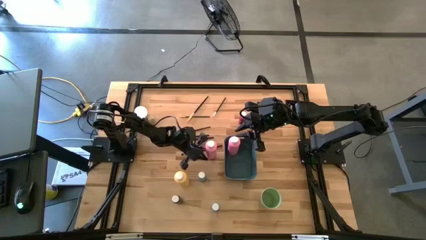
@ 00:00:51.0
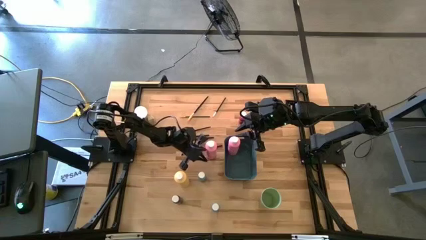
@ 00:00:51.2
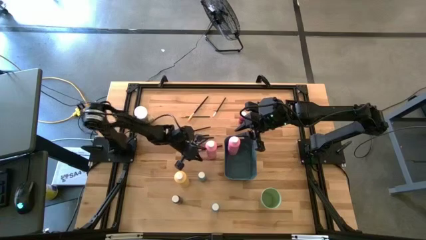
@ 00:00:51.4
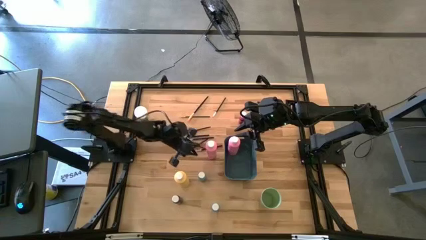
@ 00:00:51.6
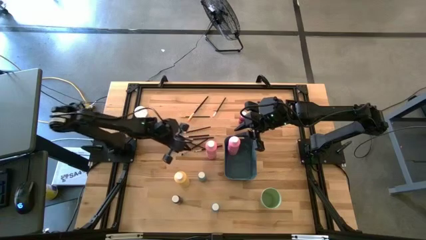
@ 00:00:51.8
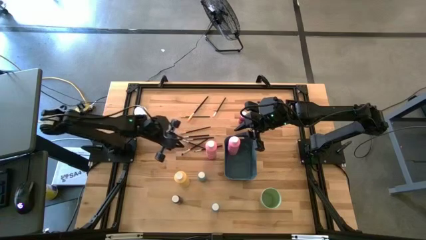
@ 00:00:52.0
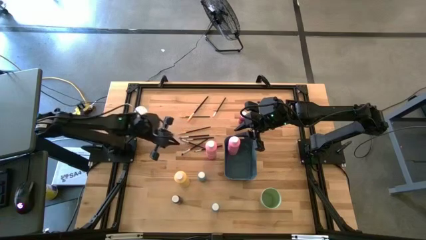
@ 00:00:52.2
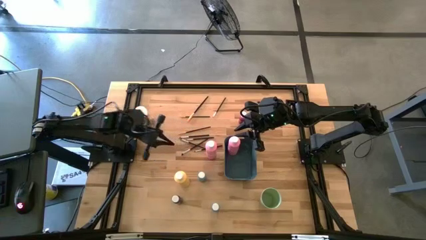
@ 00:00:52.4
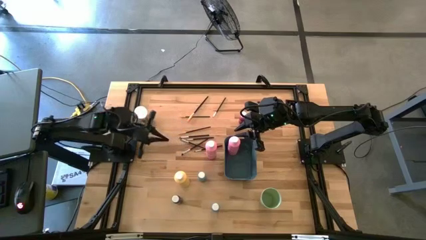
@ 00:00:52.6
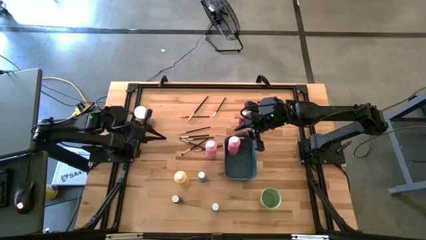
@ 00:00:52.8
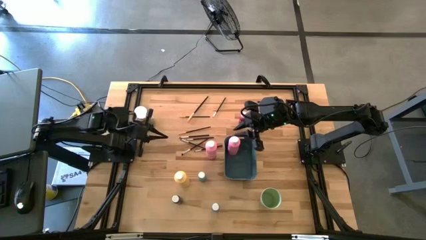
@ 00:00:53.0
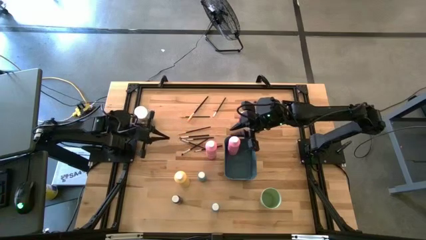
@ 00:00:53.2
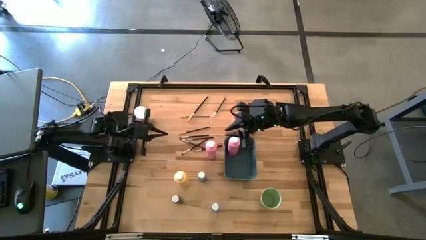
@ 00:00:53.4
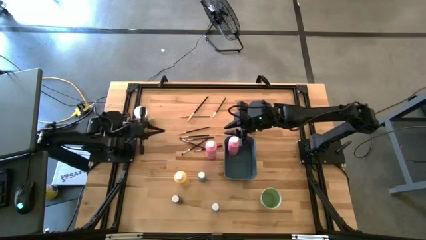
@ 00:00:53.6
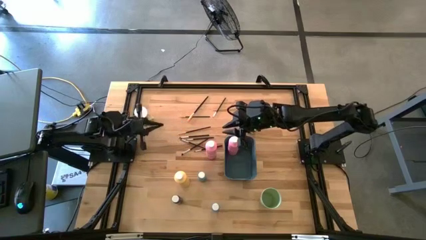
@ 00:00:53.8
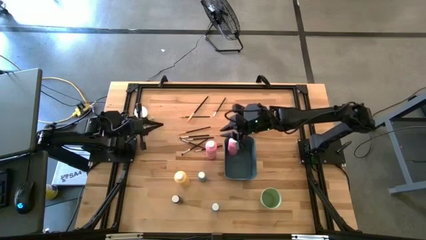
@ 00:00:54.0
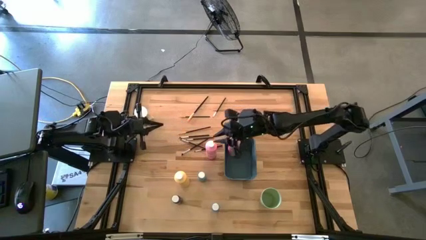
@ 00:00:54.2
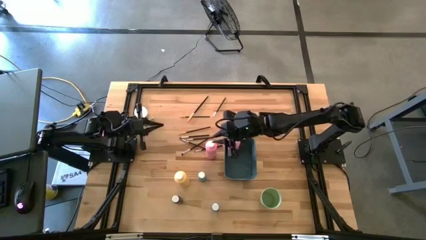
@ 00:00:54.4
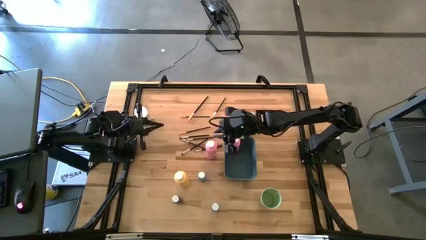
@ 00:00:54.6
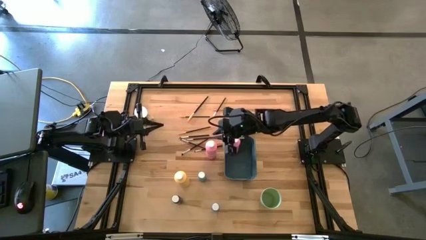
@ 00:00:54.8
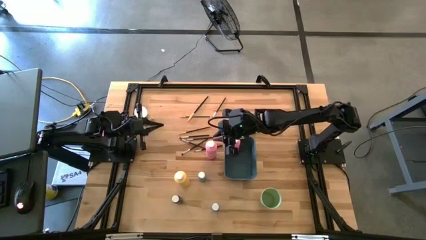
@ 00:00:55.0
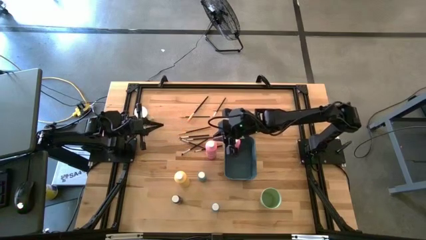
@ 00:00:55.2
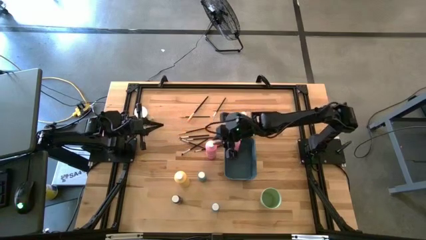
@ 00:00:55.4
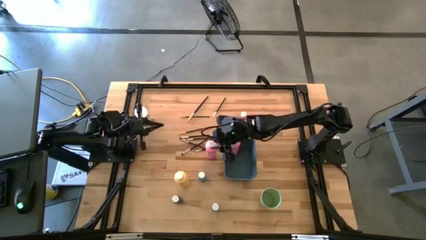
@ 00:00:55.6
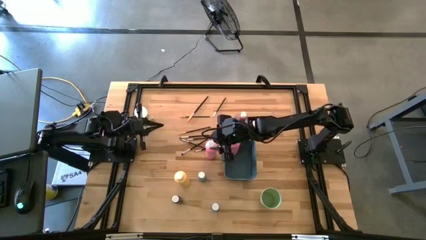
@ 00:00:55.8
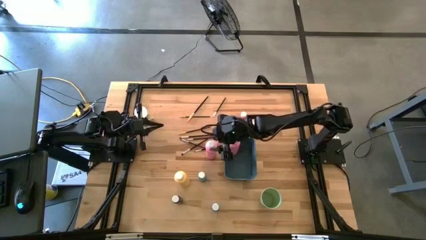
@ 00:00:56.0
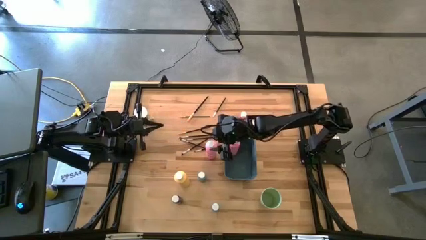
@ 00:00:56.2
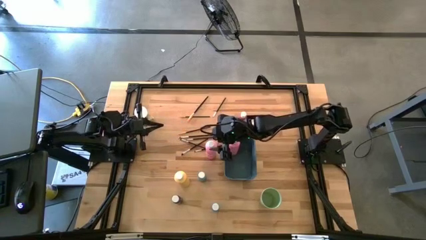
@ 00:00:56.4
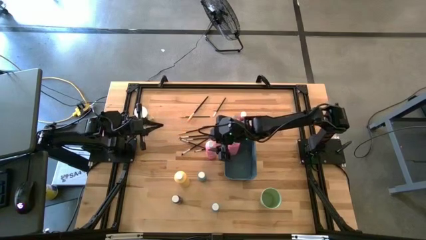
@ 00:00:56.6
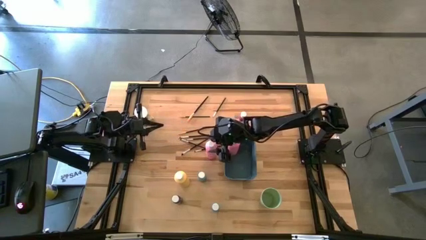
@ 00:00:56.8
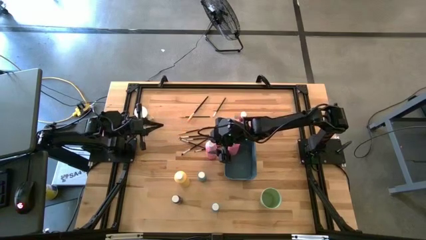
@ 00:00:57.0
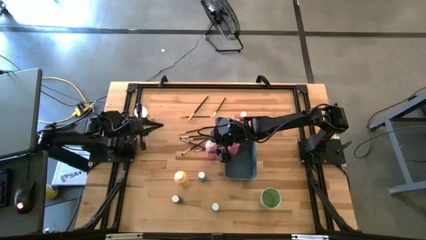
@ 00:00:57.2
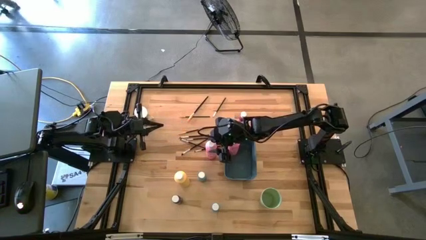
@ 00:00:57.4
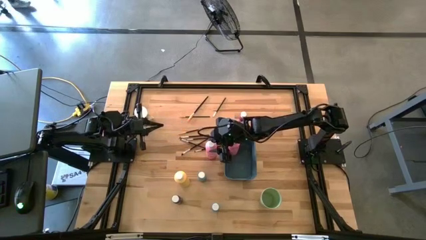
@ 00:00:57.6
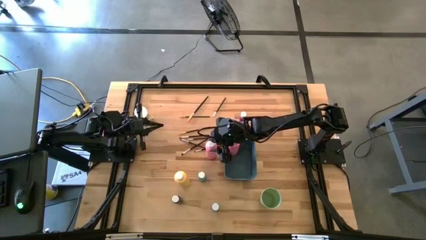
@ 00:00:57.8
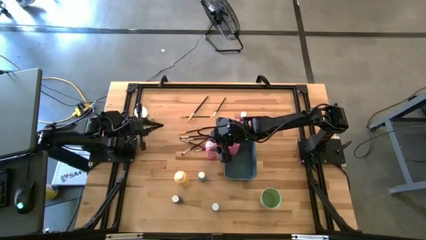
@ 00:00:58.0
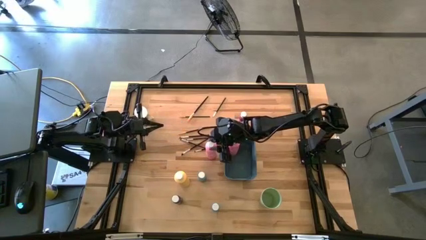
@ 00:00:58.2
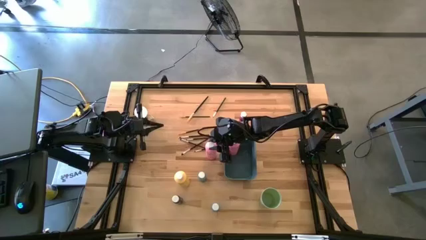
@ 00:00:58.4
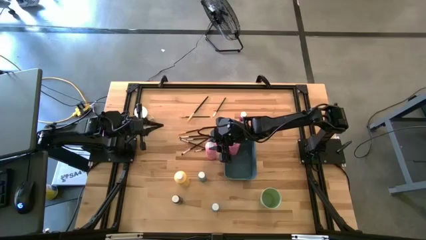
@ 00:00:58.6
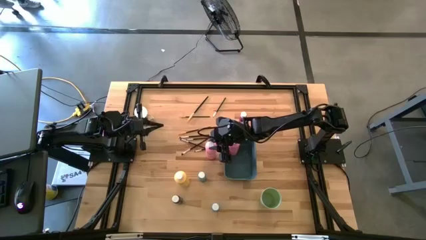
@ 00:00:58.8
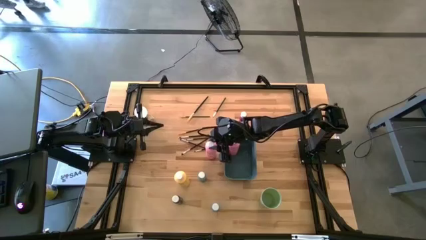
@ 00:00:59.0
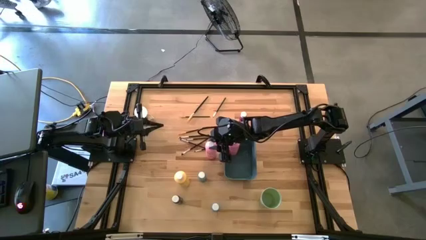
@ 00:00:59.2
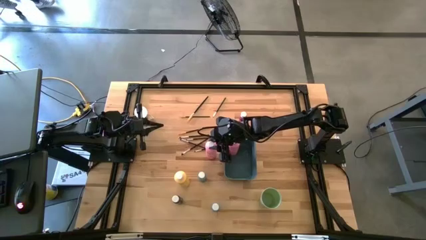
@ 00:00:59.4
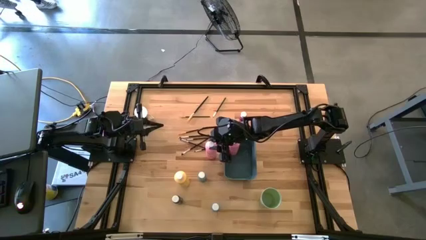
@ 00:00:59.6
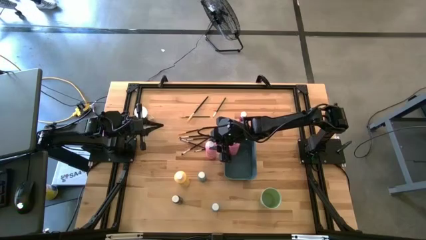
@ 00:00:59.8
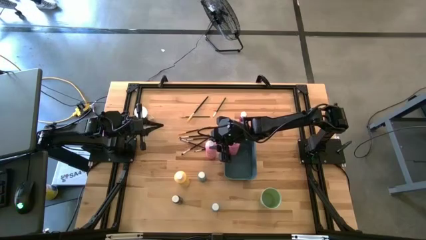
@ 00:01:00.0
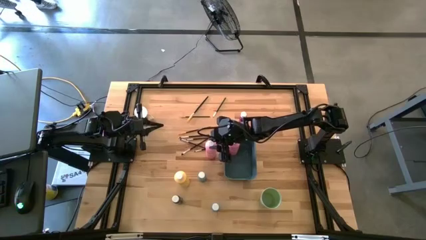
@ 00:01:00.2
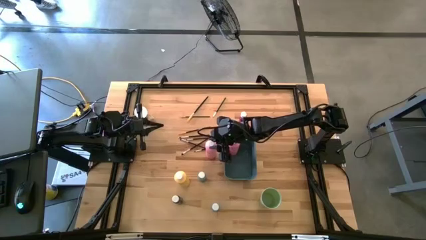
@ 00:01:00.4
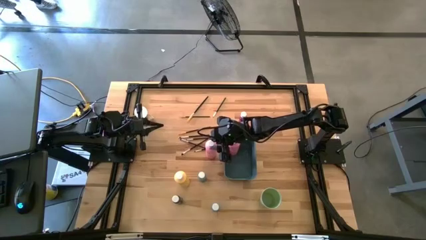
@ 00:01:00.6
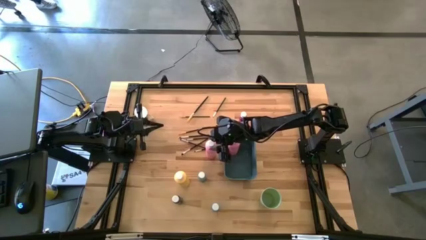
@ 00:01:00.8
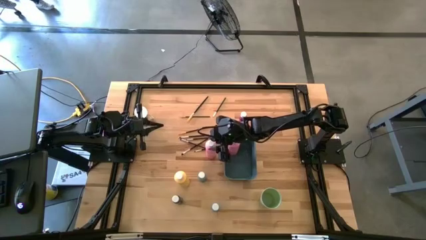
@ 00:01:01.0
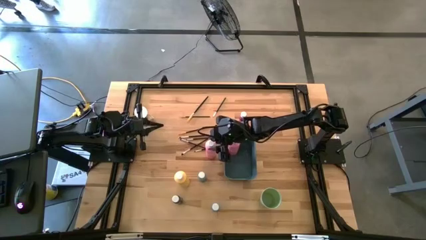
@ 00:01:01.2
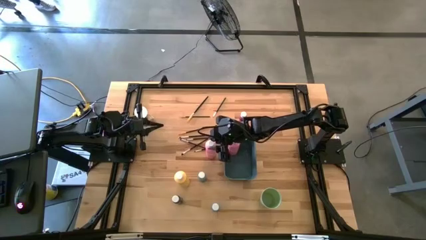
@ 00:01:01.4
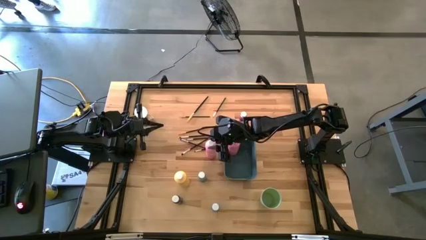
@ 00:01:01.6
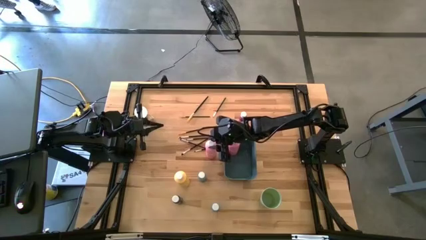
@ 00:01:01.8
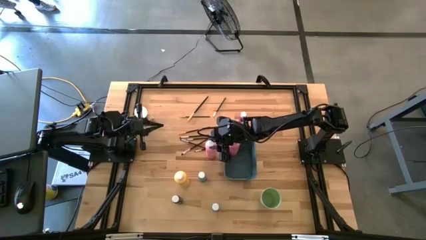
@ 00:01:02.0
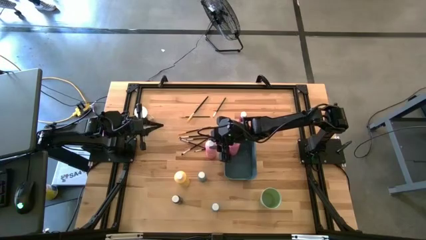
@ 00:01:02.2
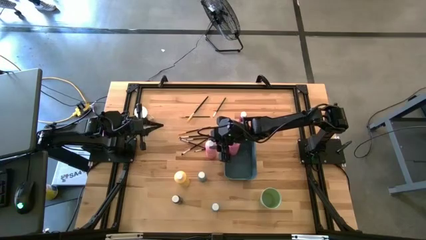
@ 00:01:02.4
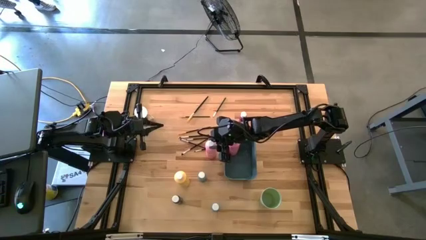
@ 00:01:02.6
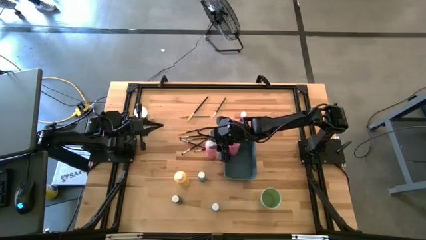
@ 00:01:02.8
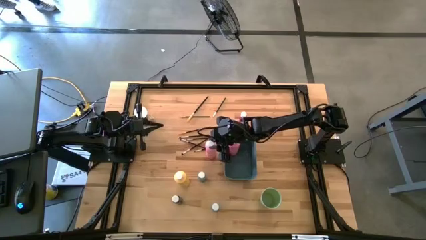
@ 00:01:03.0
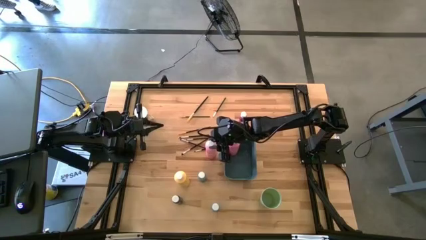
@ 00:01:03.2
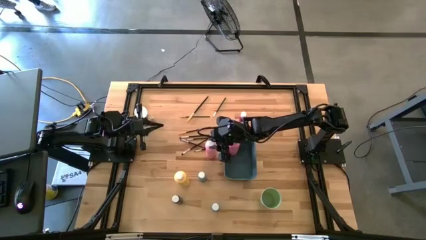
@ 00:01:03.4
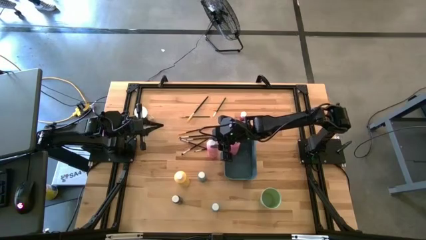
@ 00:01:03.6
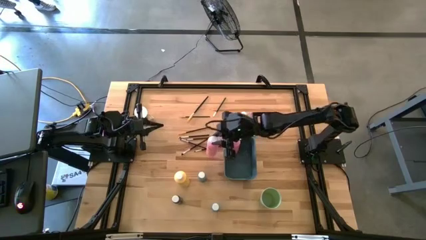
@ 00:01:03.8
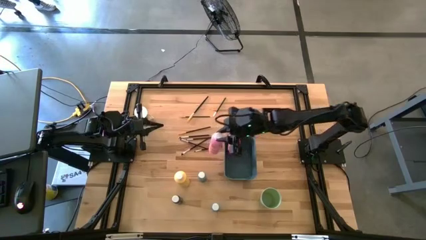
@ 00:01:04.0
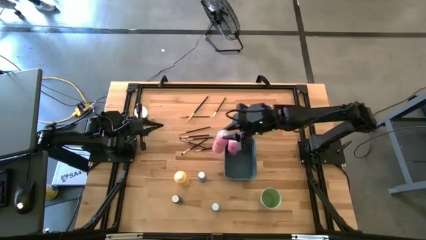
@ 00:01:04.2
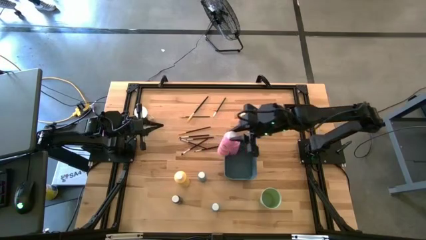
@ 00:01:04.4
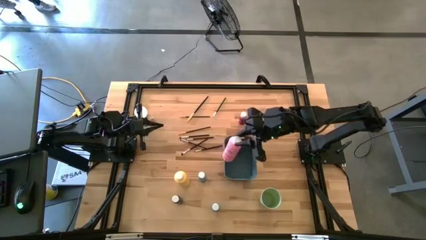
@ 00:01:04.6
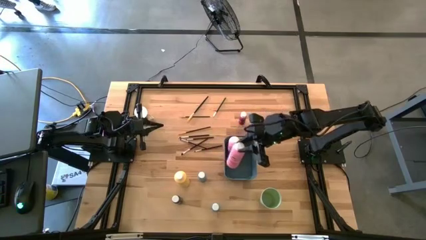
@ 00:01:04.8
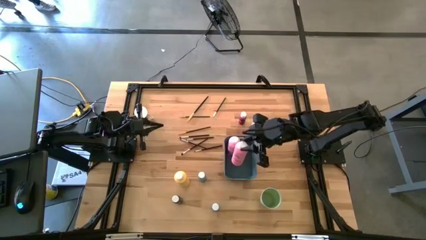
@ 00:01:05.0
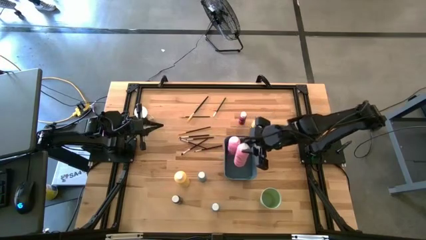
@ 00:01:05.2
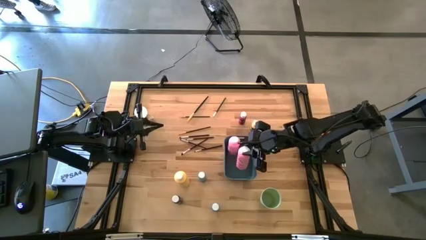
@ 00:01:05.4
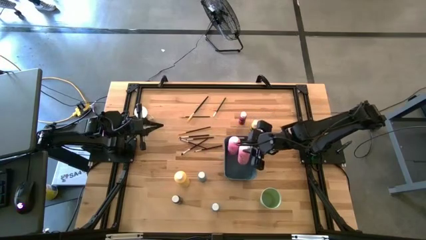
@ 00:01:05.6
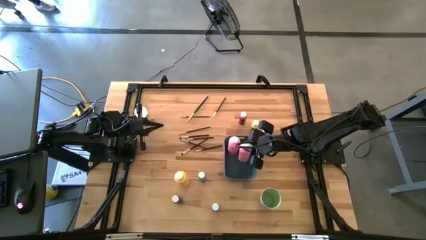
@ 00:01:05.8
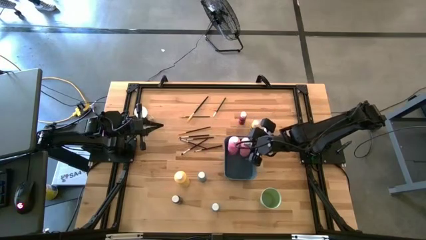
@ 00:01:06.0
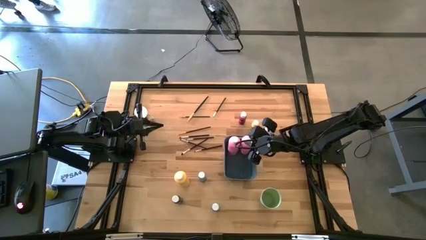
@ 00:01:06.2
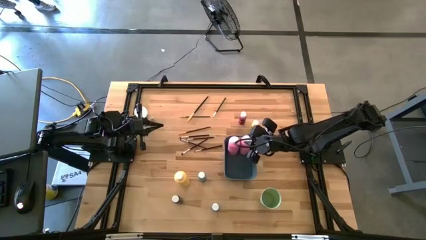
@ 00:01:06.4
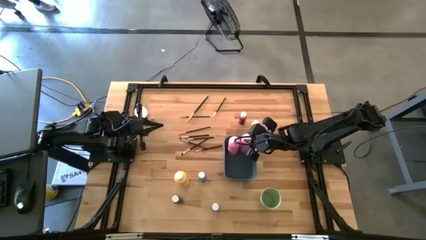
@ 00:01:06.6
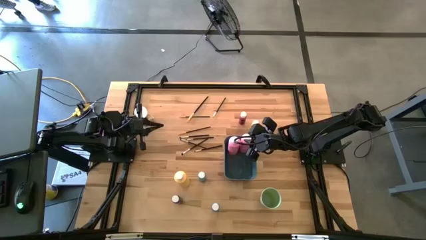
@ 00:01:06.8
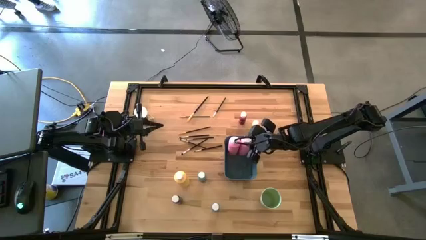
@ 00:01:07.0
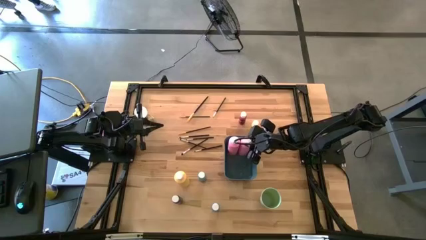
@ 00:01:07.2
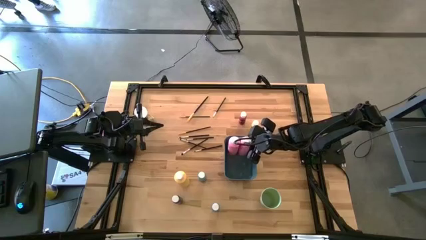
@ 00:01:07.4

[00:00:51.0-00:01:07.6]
Task: Pick & Place Paint Supplies
Put the large pink paint bottle into the blue bin
